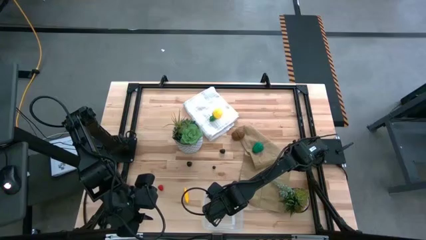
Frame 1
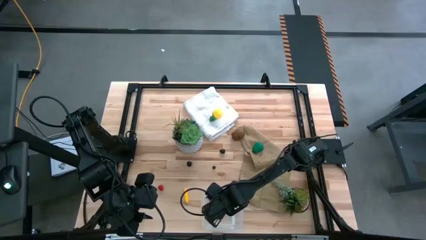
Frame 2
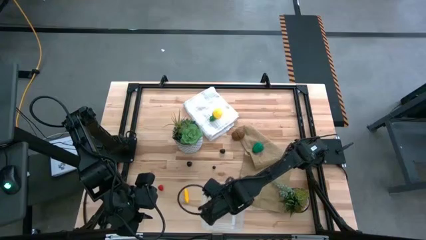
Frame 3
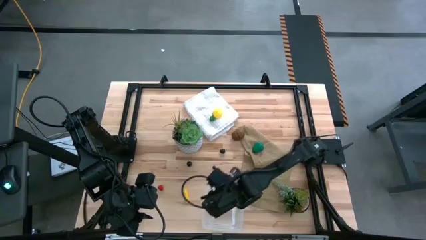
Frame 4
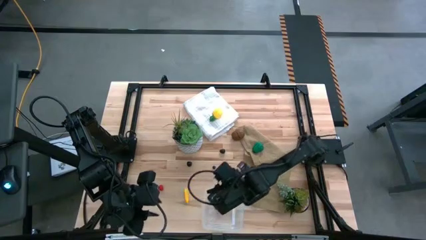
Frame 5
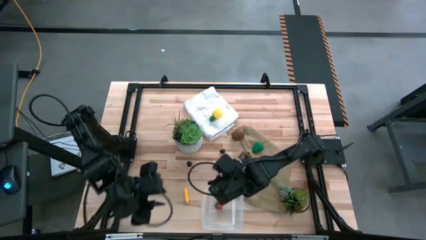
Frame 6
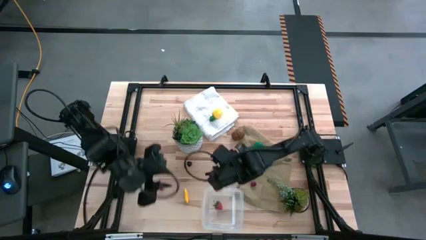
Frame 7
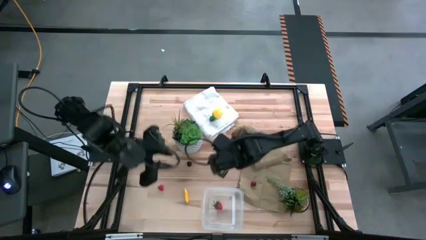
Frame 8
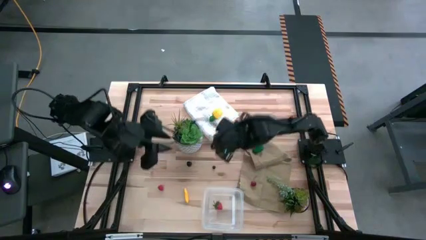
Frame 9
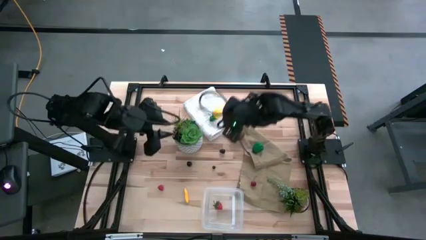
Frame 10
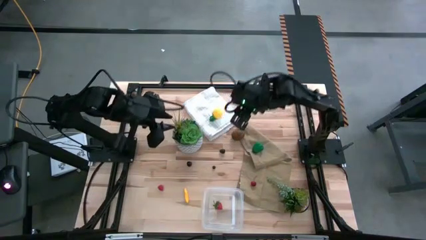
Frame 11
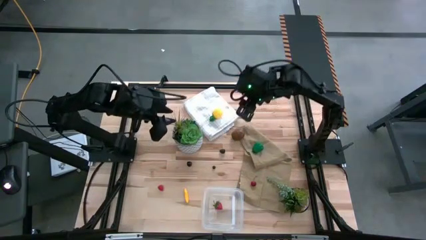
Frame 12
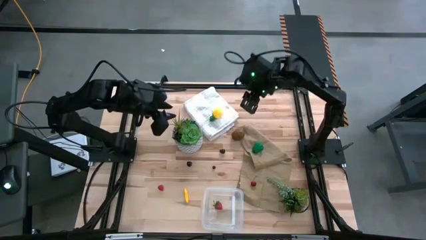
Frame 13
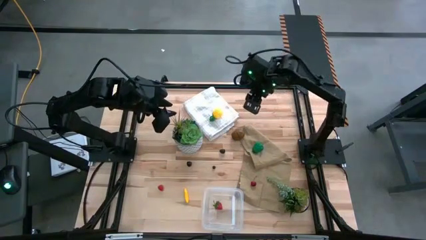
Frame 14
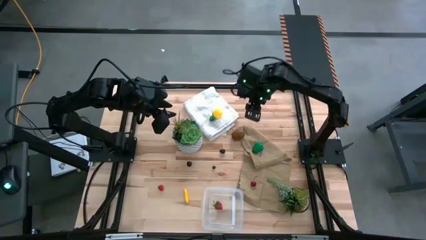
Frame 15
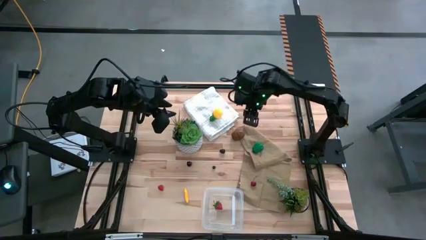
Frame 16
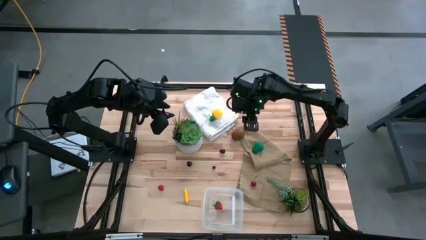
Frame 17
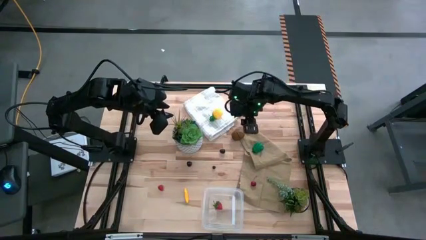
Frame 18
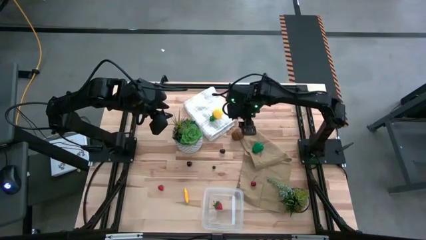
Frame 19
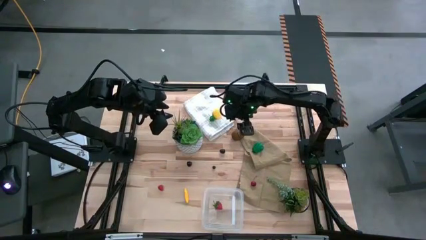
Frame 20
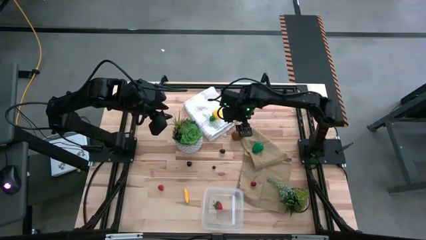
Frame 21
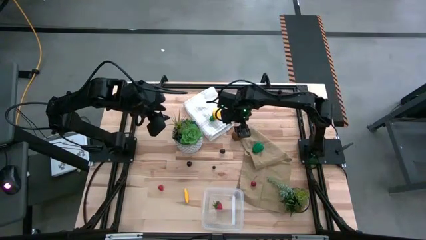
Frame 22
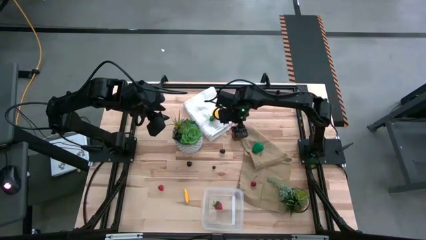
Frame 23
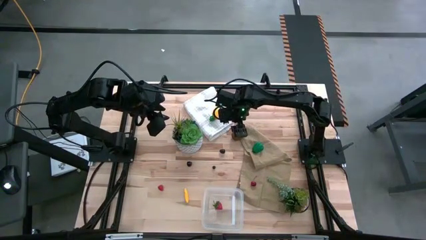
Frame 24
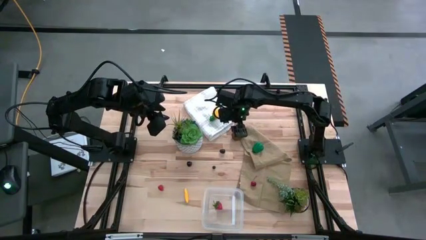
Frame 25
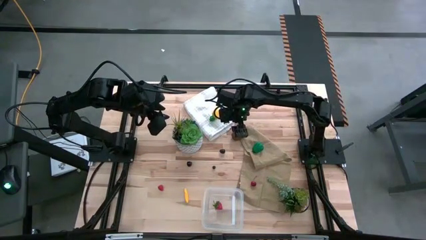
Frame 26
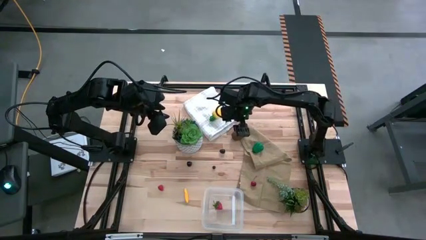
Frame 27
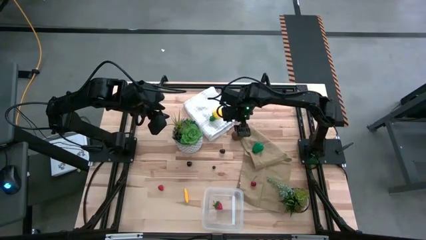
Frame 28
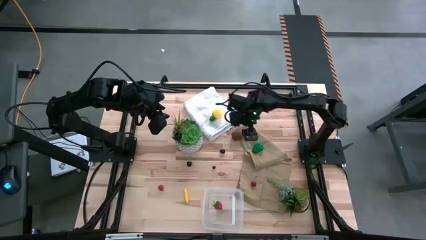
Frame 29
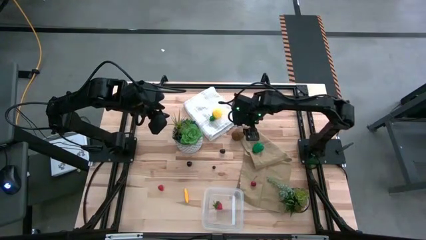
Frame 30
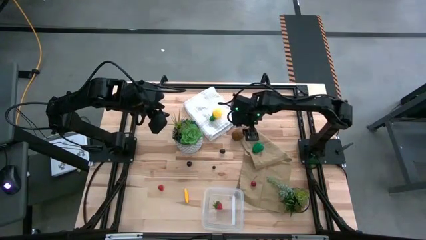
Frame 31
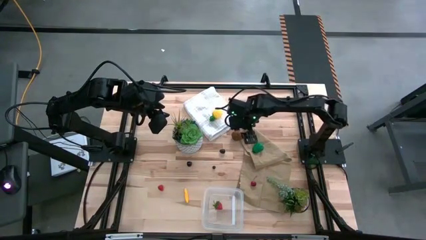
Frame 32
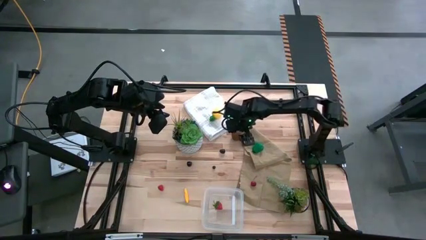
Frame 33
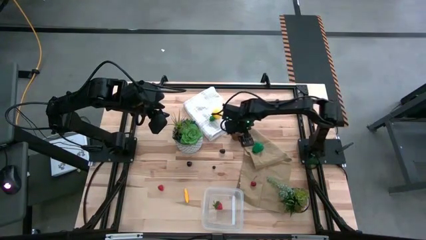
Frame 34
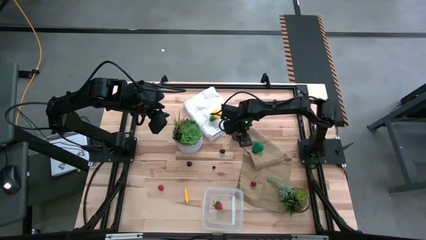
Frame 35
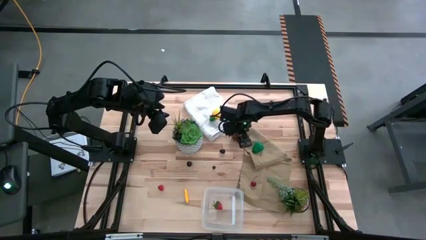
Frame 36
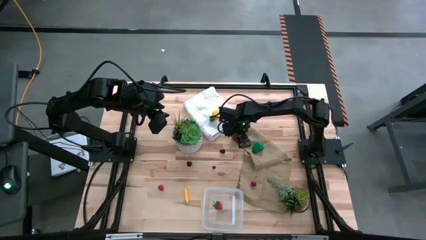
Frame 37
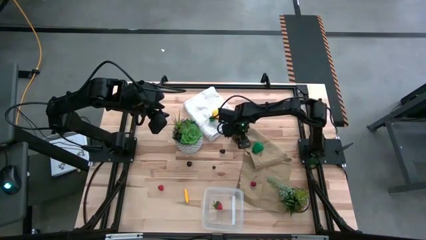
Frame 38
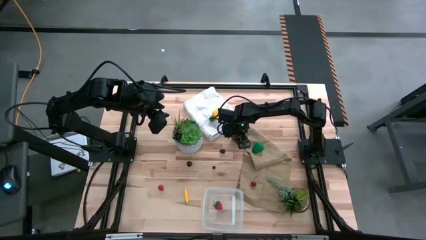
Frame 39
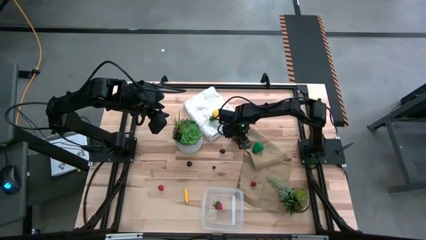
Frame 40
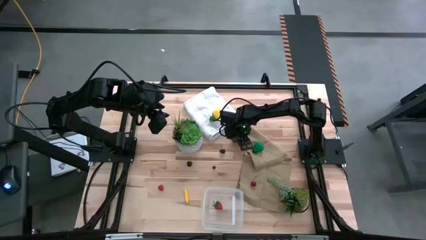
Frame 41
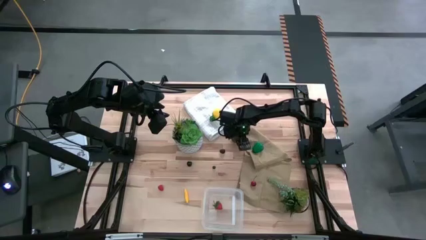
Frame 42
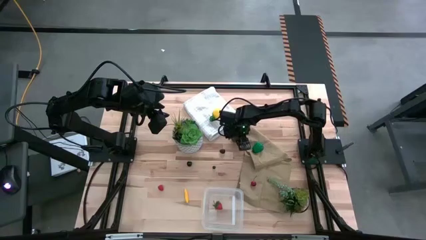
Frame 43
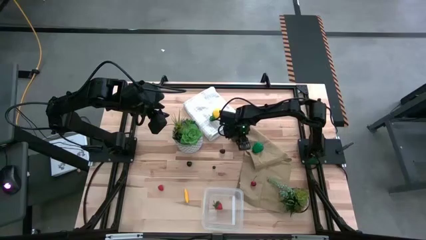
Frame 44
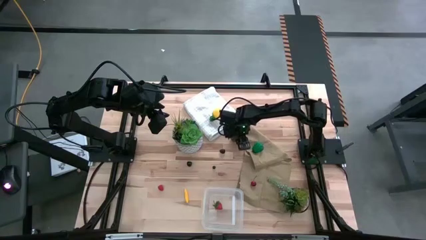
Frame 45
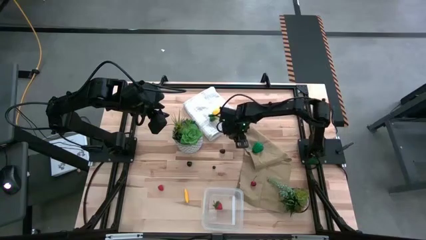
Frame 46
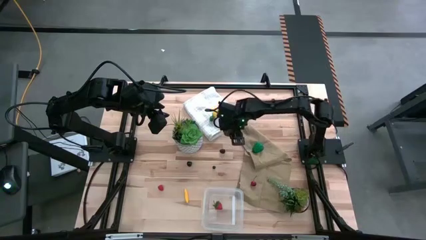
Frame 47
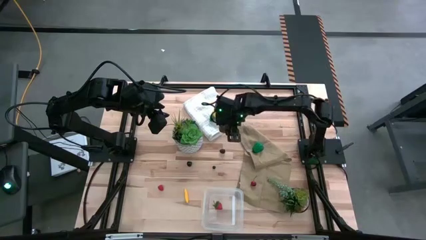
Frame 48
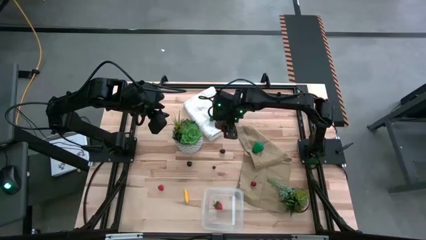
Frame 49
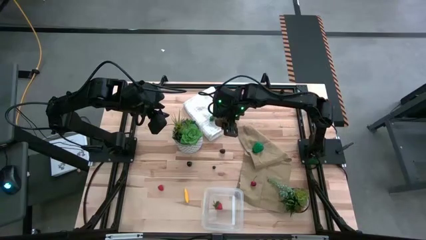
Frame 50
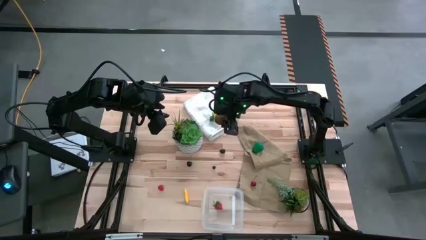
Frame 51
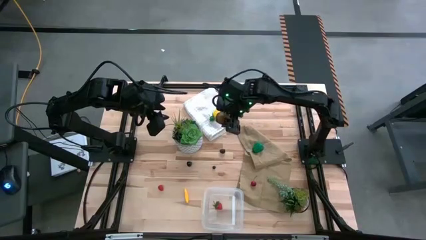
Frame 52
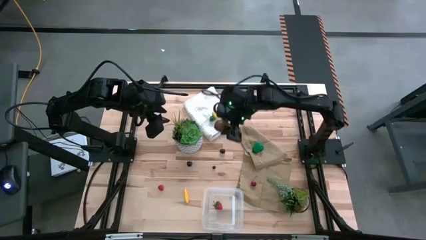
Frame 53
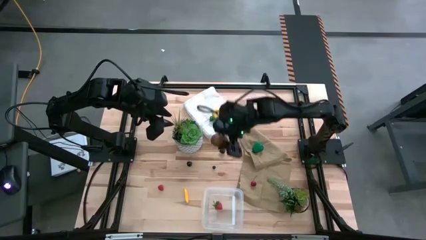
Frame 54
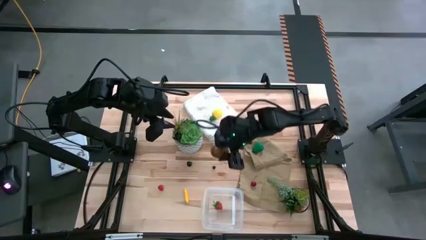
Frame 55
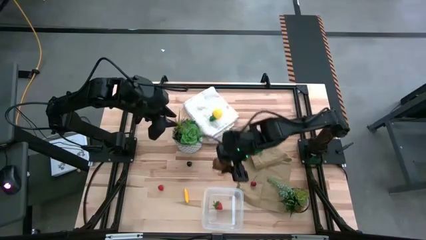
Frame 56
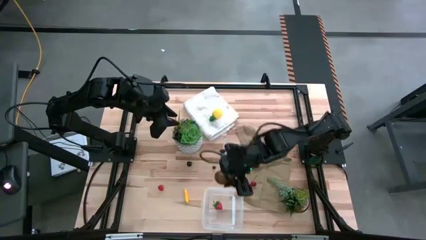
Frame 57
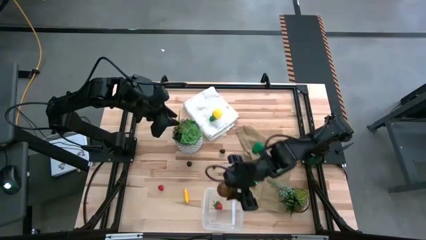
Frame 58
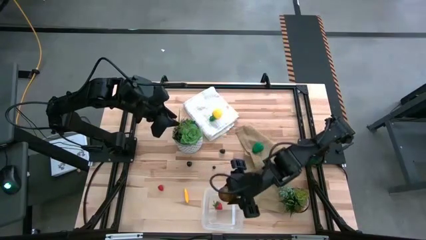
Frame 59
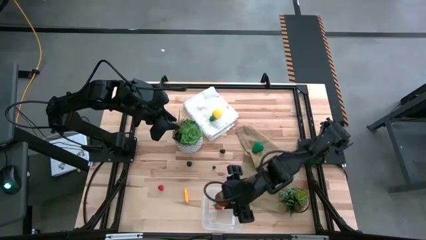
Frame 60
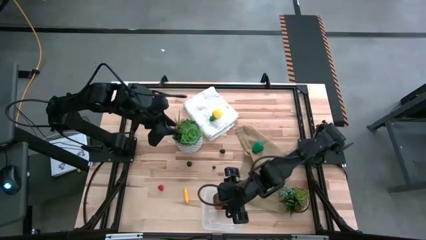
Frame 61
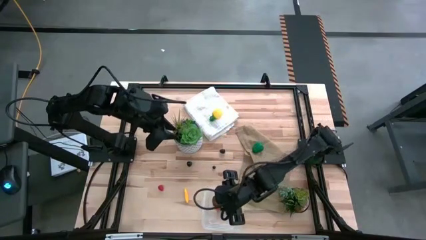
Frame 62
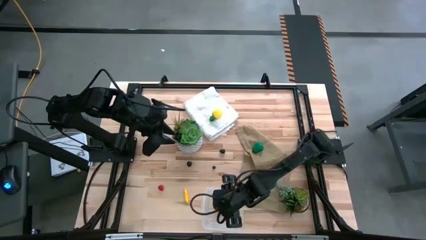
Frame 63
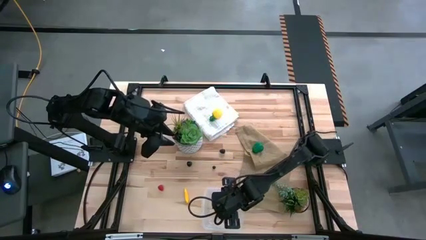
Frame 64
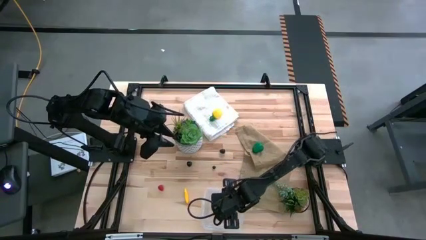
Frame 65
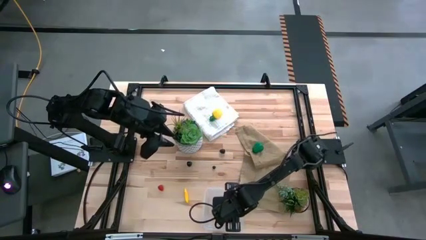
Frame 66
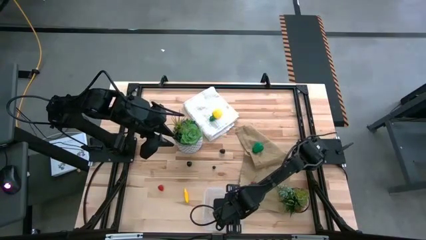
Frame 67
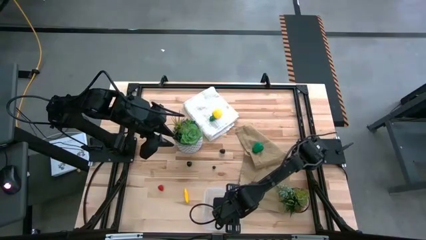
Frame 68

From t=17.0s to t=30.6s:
Task: Pick and placing Produce into tupperware
Put the brown kiwi into the transparent bin

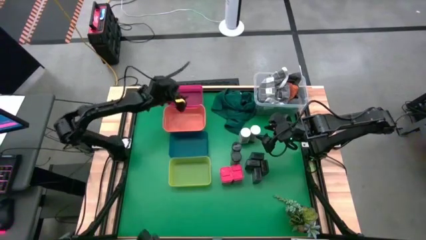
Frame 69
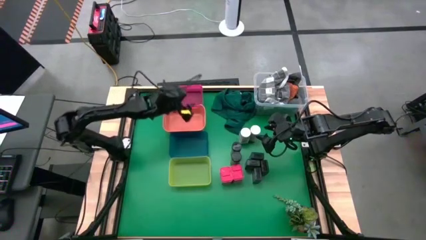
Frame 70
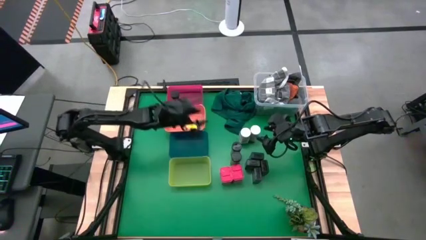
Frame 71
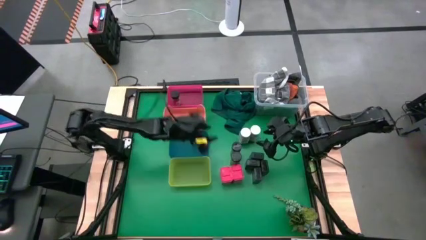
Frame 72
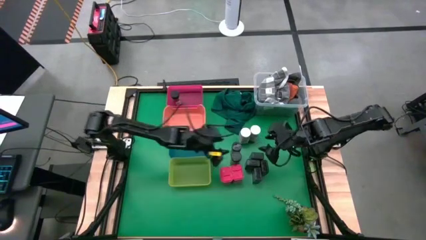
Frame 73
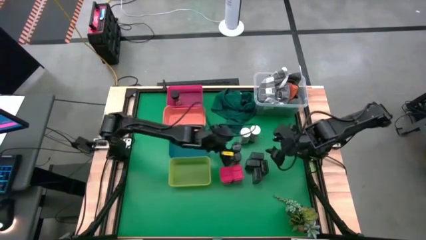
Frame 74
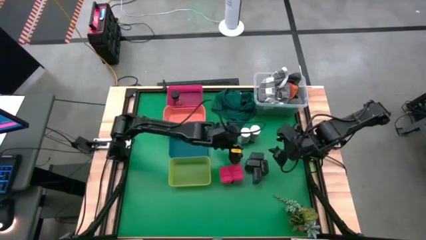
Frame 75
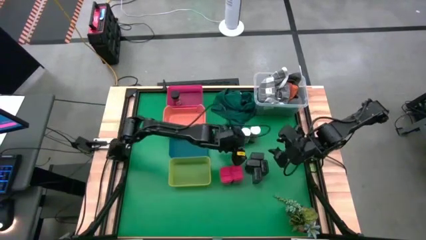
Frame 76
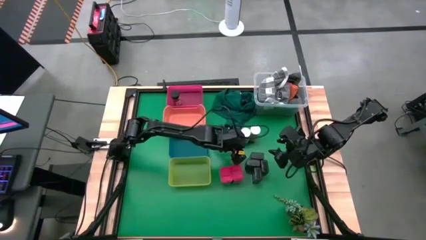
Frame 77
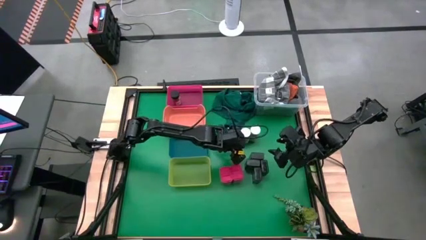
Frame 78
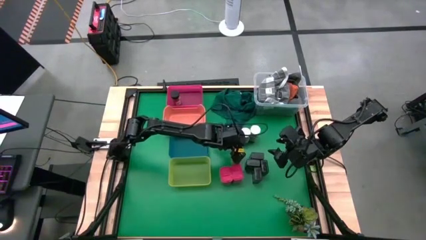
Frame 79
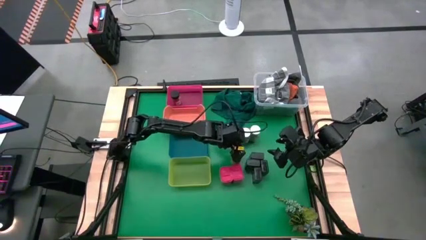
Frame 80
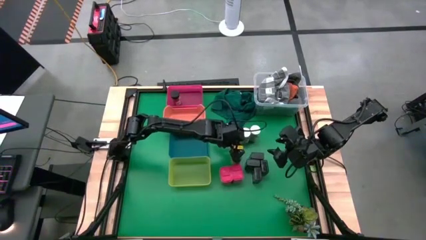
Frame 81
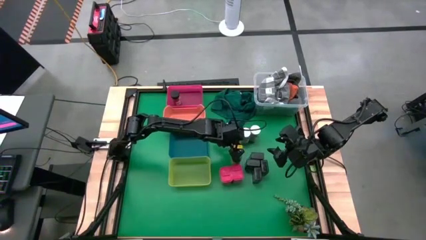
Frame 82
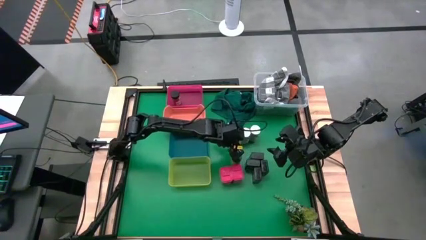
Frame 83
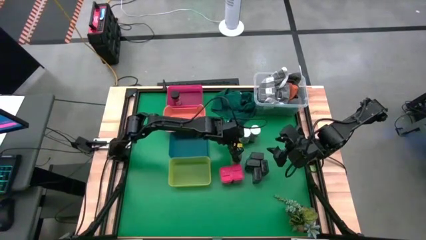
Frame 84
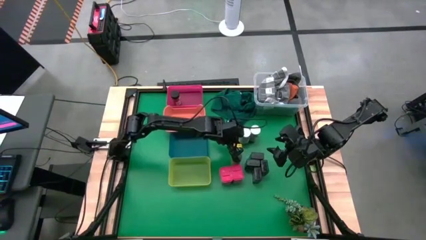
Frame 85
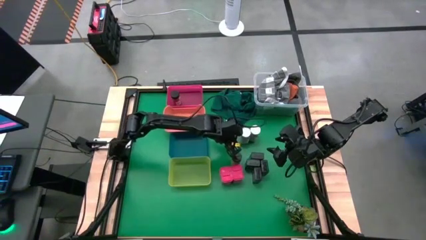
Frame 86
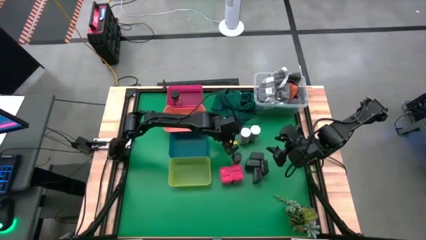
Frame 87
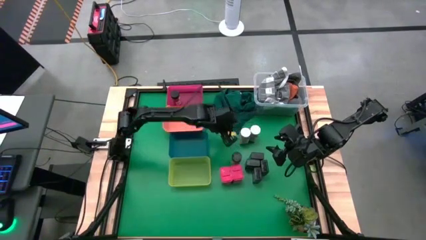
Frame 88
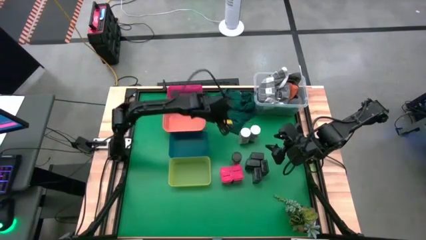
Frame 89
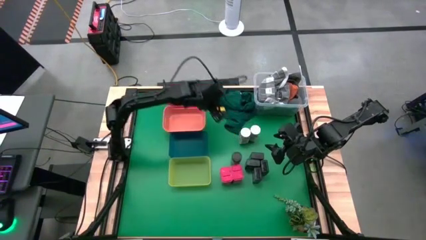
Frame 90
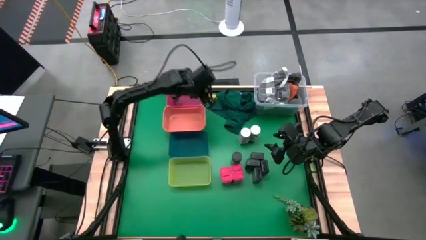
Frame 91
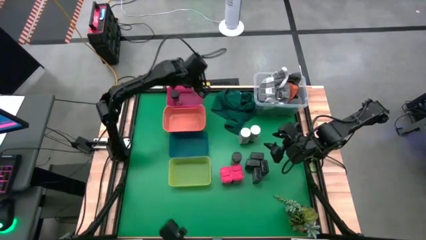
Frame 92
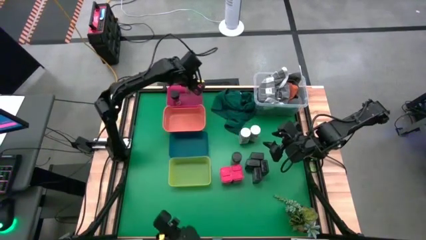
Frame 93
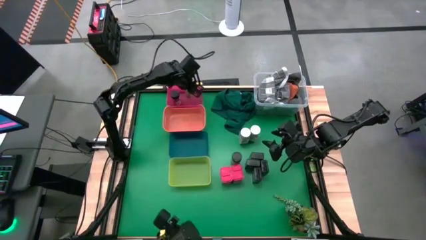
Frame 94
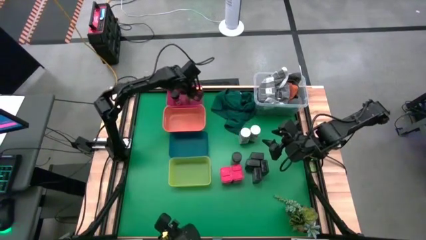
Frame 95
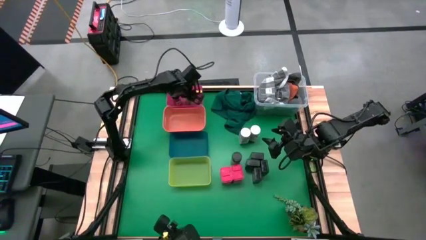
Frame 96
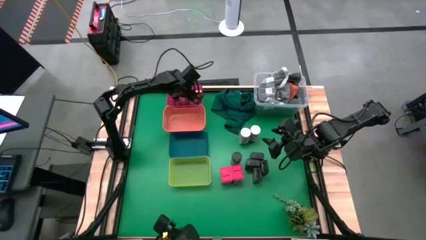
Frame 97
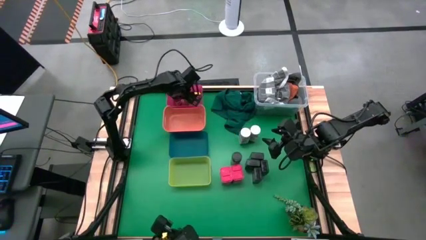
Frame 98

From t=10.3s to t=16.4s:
Task: Sort spices by type
Put the top black spice bottle into the pink bin
